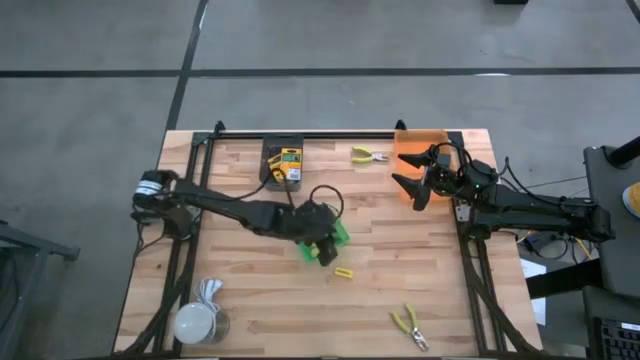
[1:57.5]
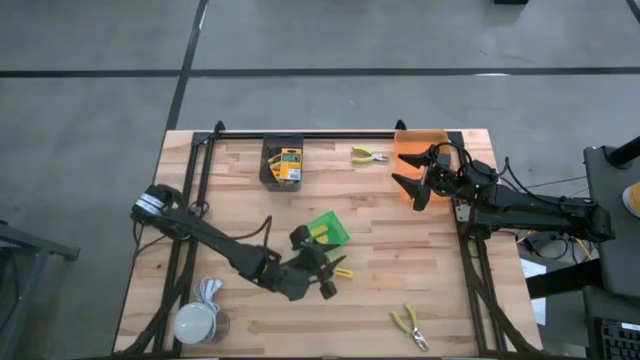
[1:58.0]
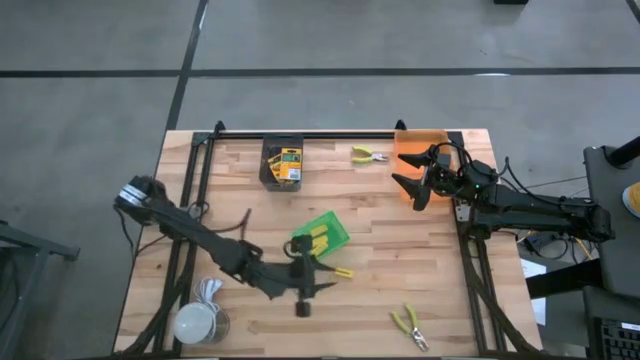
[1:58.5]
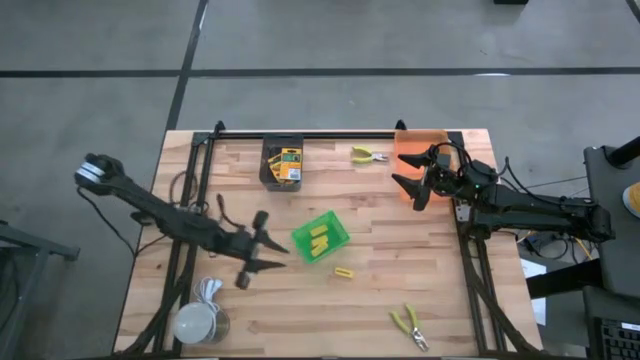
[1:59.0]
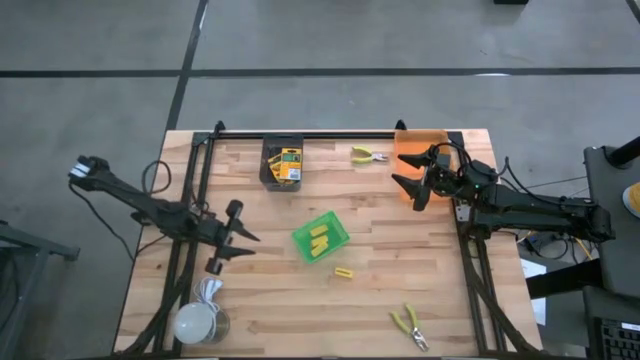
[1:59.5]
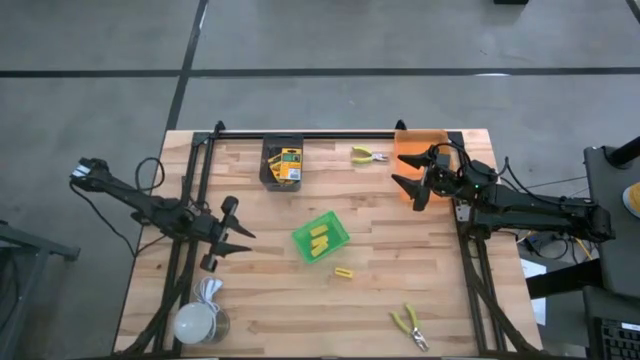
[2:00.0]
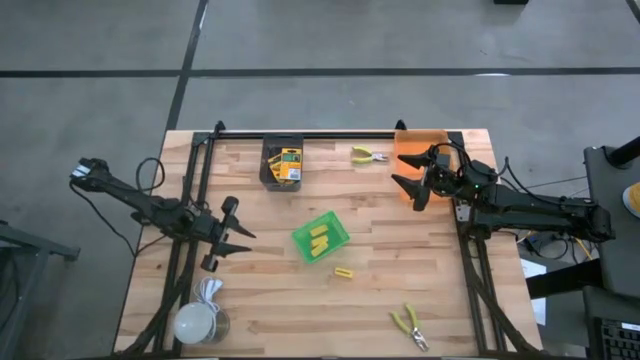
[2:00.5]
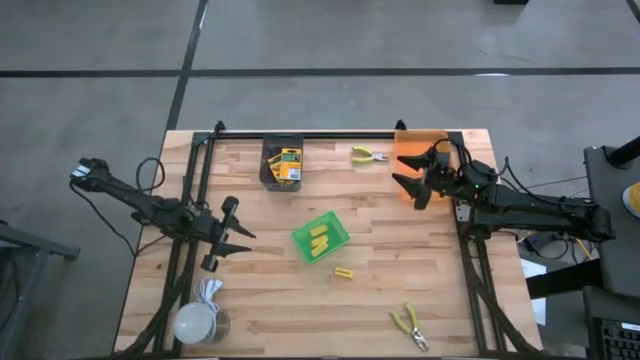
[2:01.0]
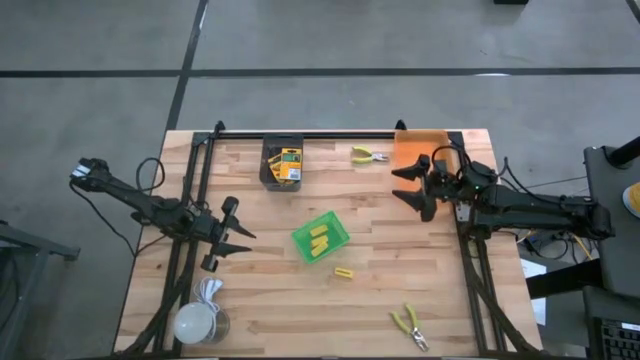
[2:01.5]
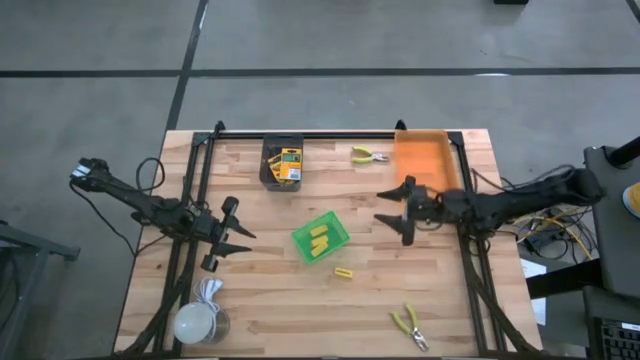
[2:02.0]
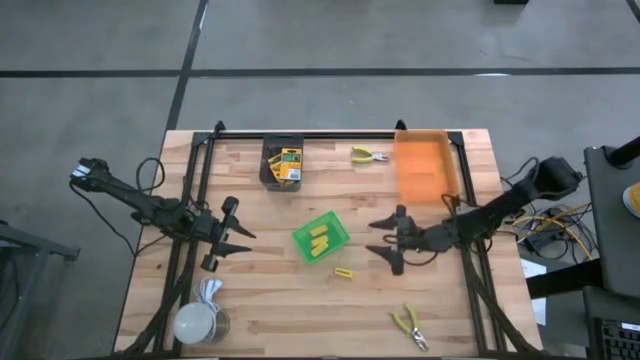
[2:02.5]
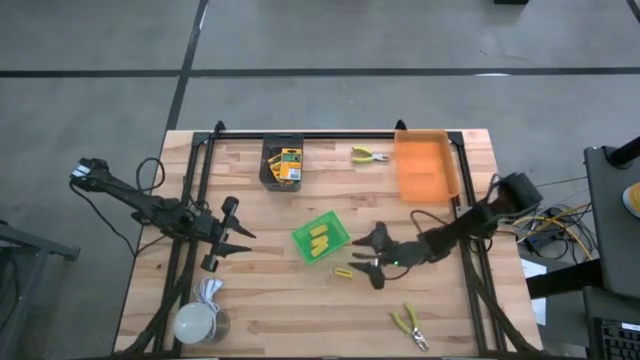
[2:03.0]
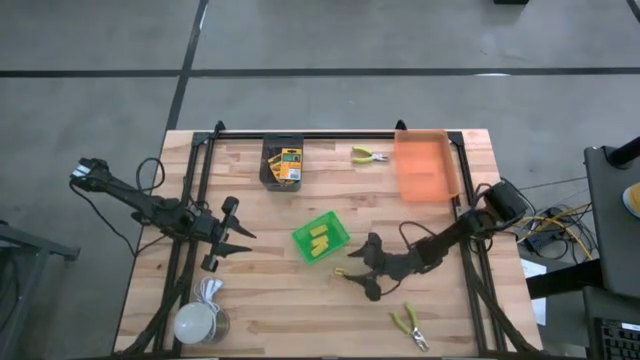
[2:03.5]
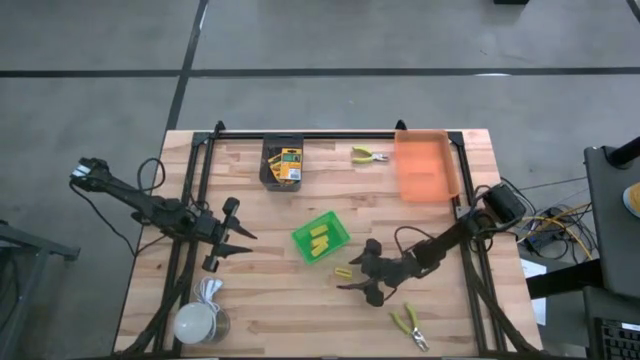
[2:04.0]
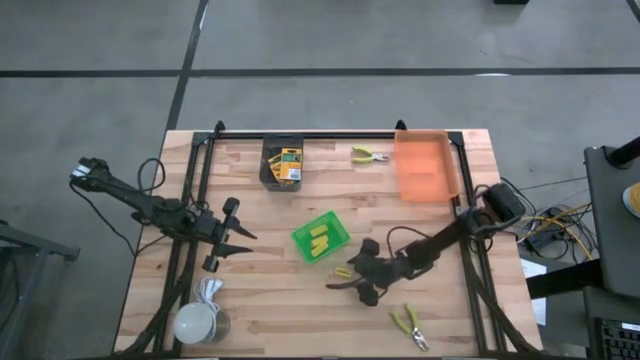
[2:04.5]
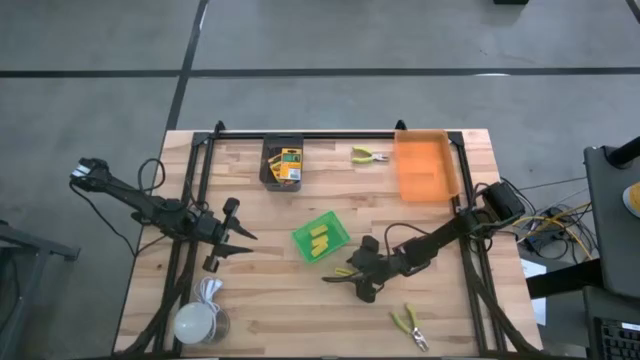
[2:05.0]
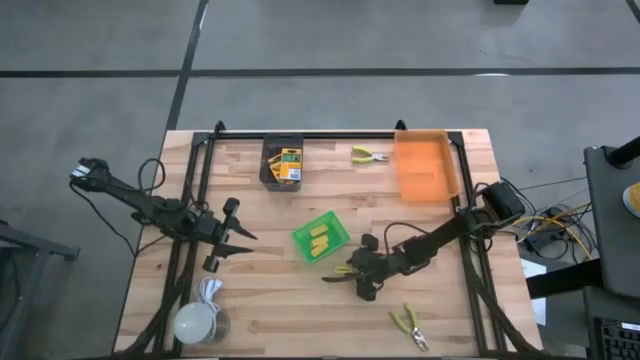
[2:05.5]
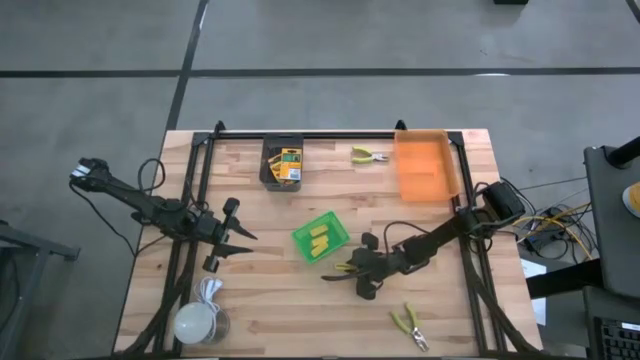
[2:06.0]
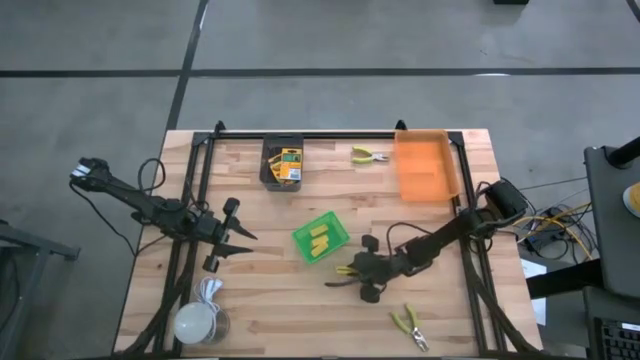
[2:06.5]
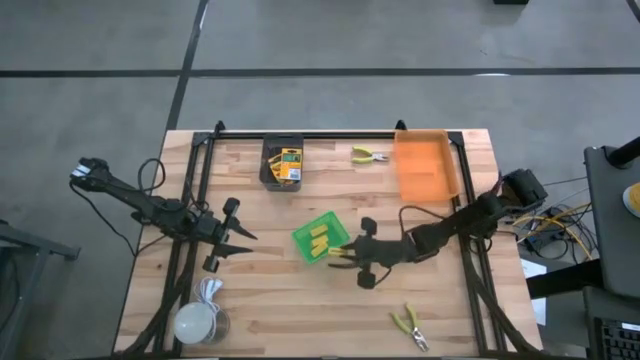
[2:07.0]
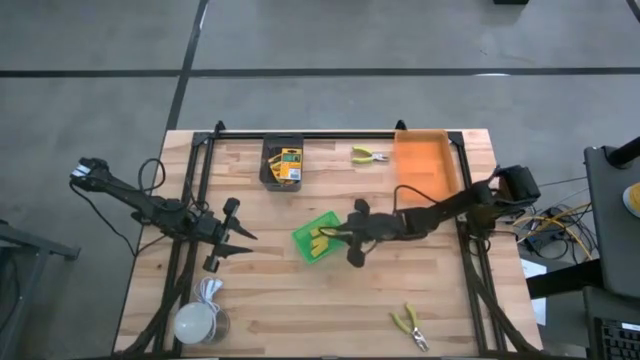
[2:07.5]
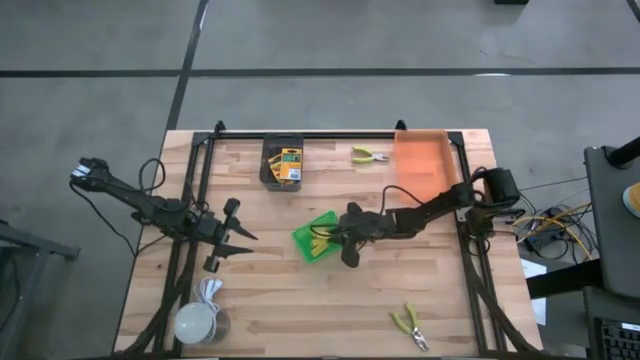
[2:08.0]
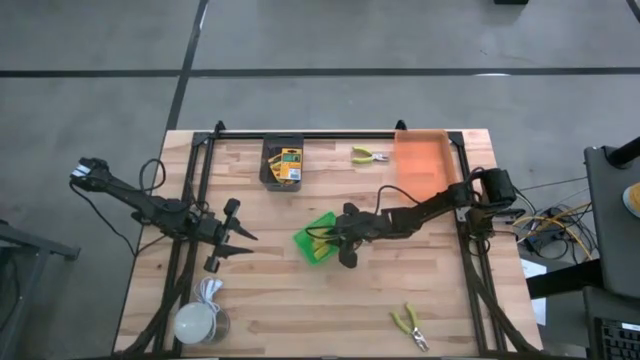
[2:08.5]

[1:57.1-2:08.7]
Task: Pick & Place School Supplies
Put the yellow eraser into the green bin

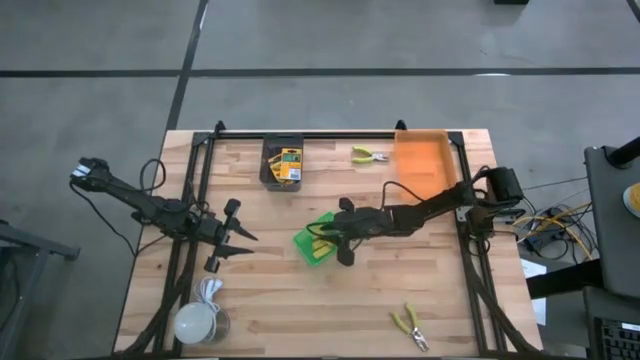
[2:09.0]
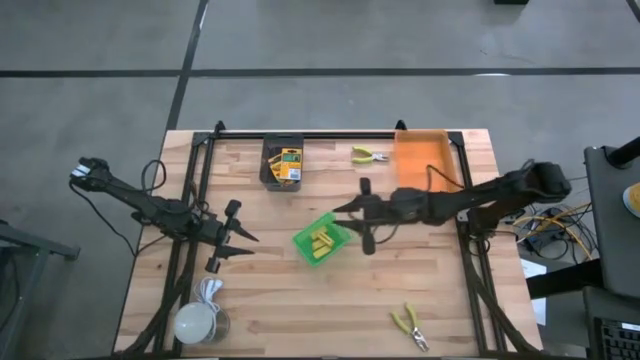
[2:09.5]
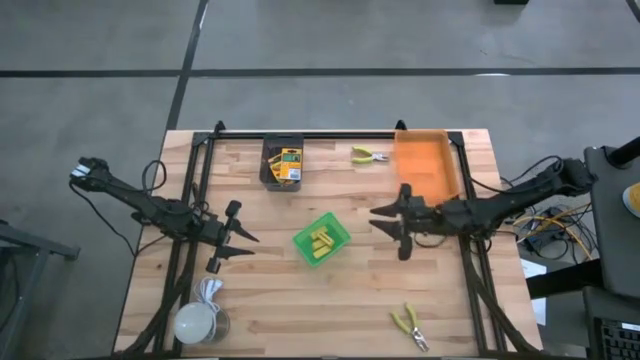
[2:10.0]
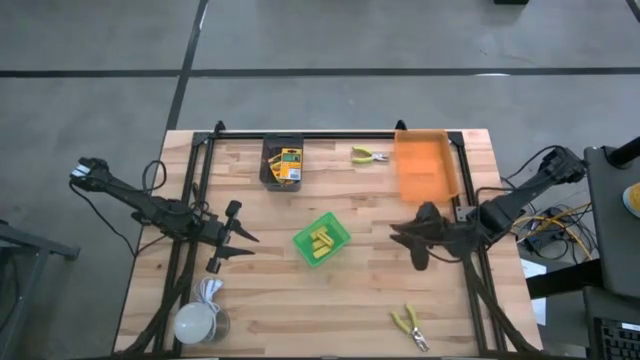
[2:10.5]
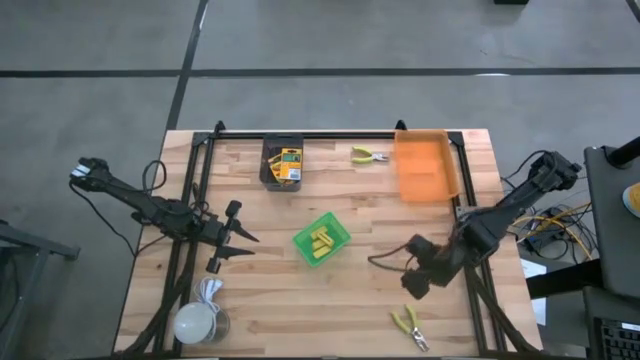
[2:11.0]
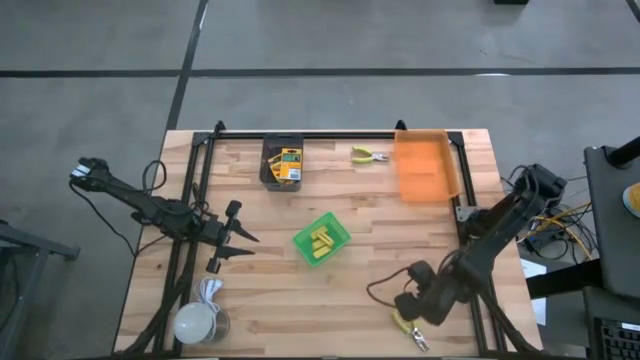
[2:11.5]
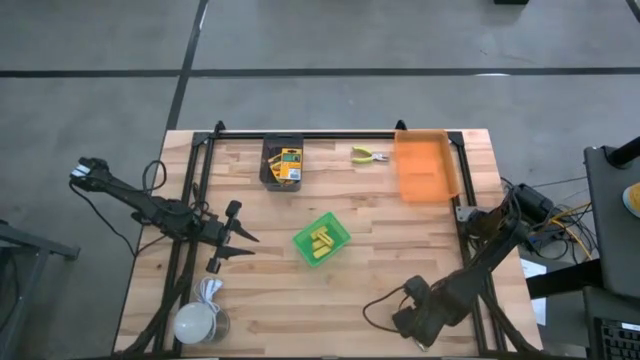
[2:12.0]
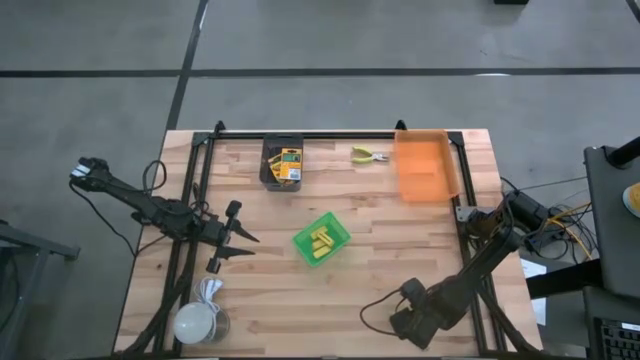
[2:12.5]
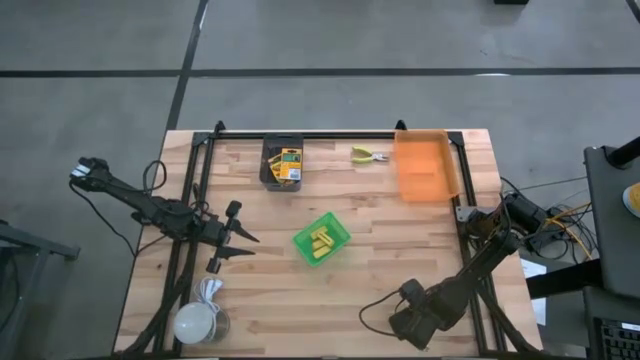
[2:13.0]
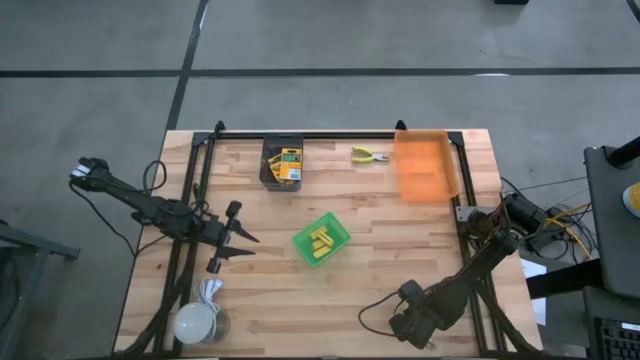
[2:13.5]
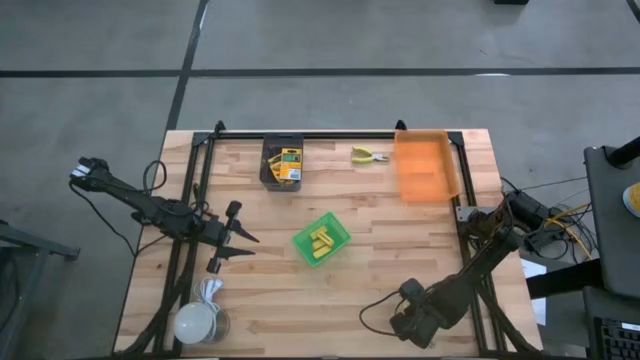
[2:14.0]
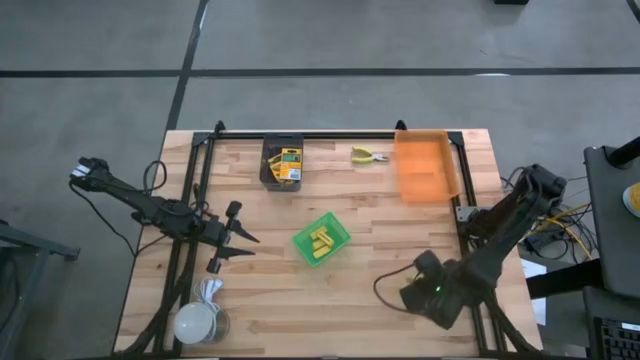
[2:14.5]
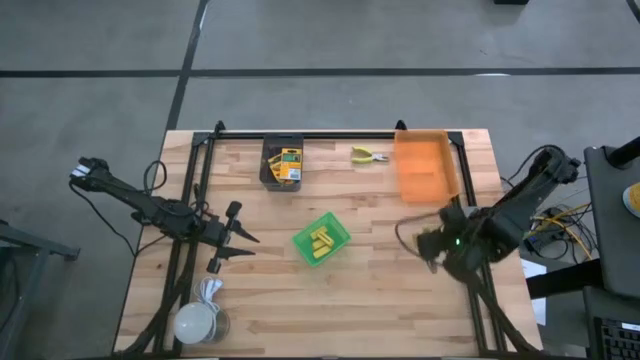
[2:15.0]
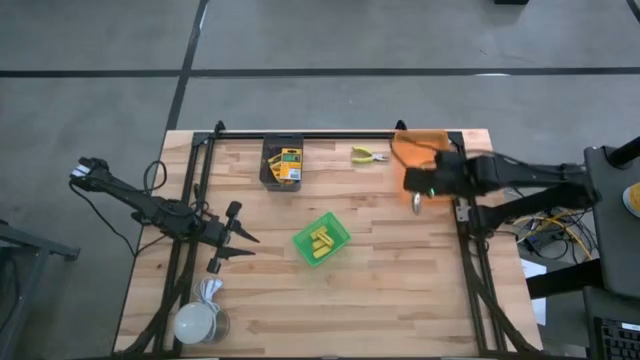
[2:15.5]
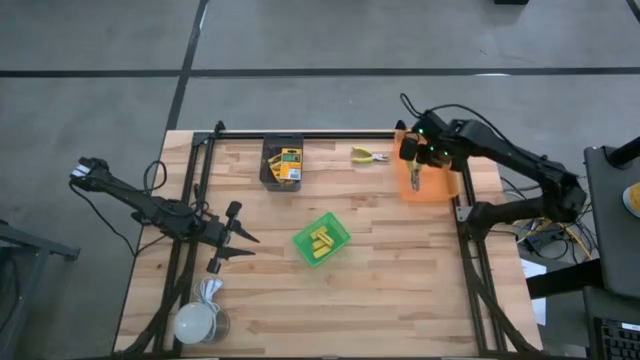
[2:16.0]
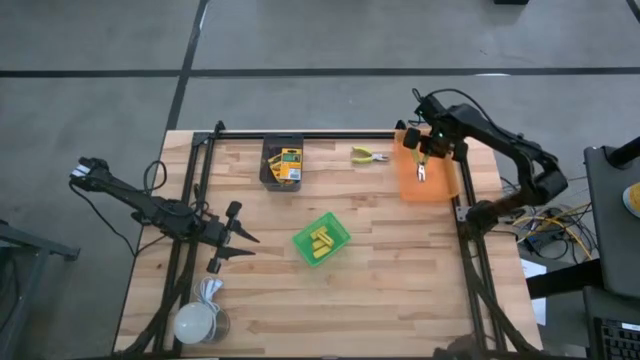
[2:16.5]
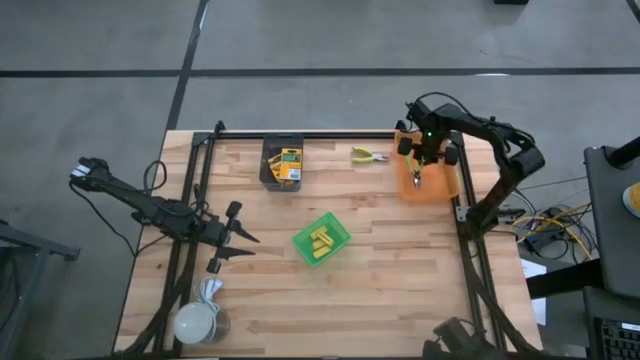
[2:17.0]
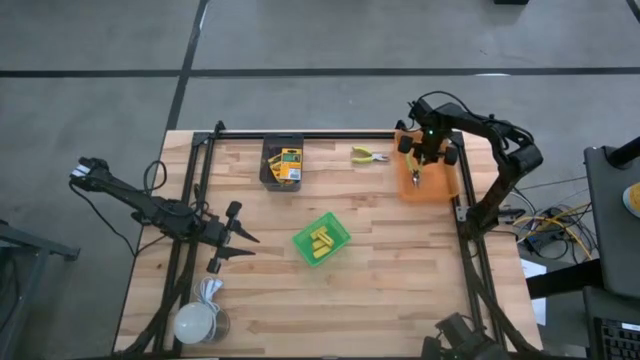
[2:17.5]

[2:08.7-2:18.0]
Put the bottom green hole puncher into the orange bin

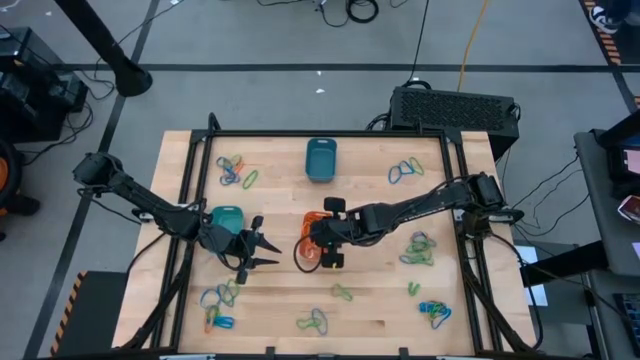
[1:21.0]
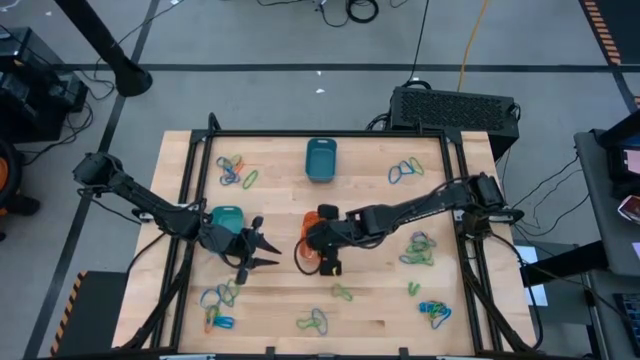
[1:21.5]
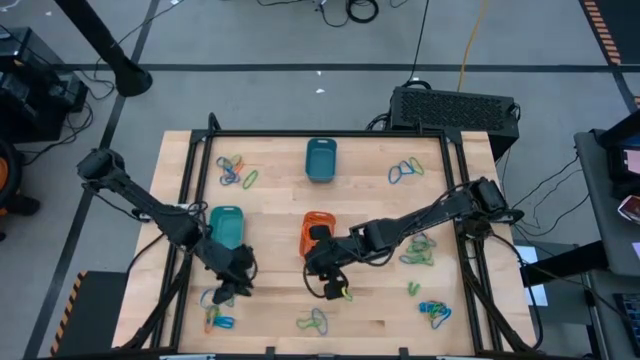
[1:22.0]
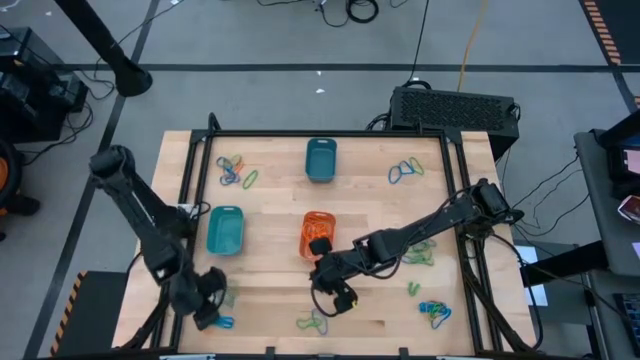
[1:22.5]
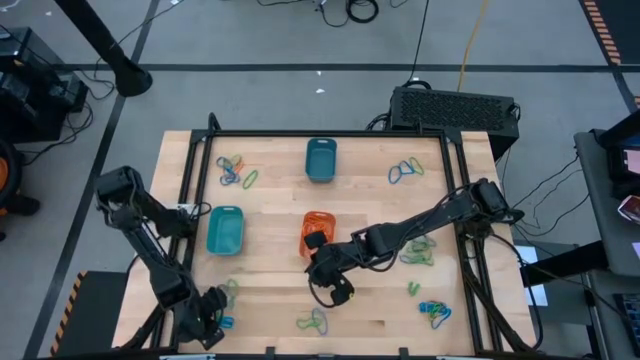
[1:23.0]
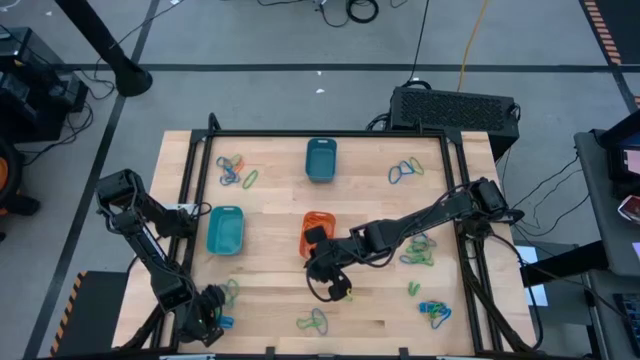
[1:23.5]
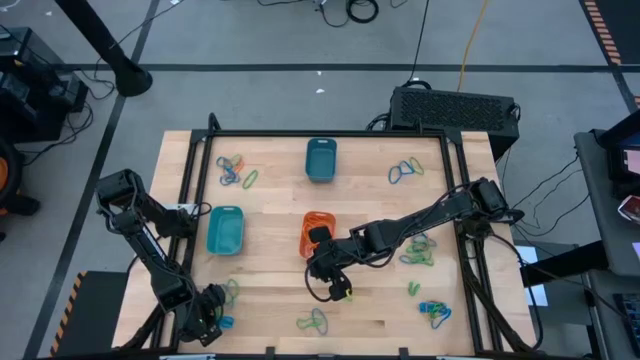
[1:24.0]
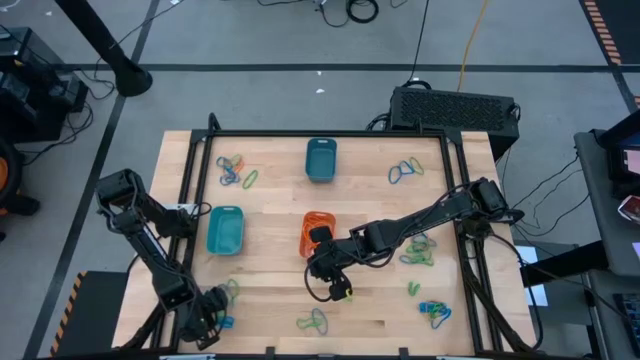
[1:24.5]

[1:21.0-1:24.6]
Task: Sort rubber bands into baskets
Put the orange rubber band into the orange bin
